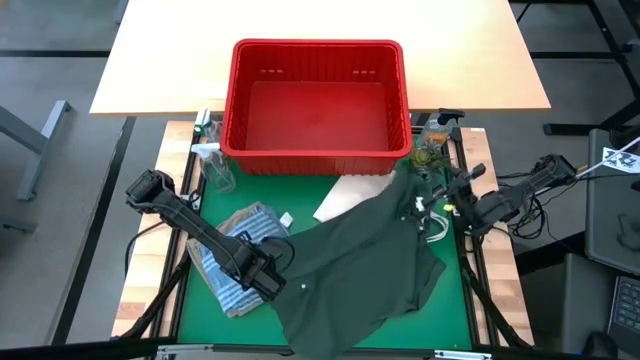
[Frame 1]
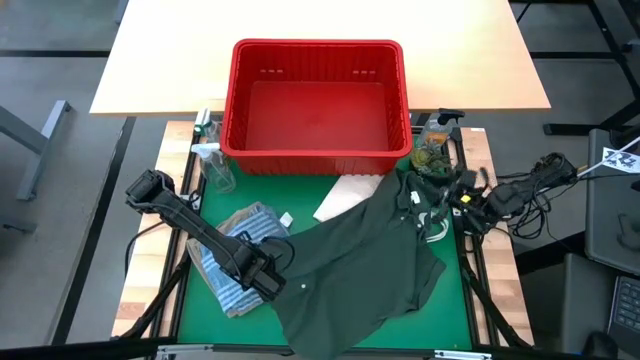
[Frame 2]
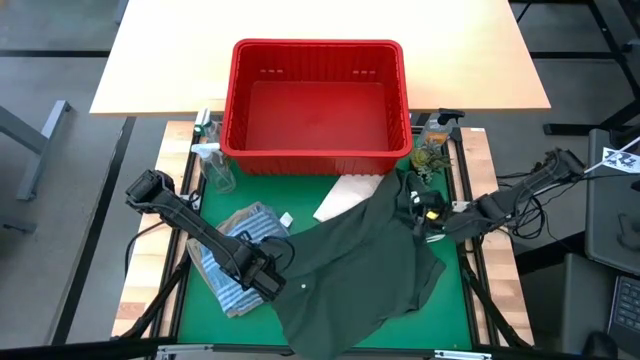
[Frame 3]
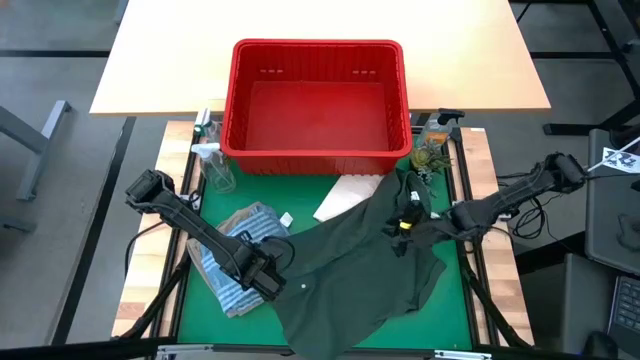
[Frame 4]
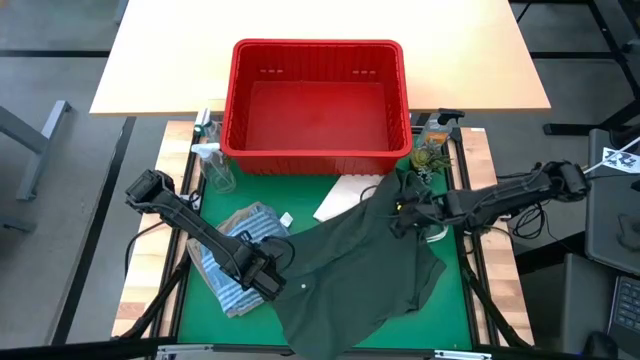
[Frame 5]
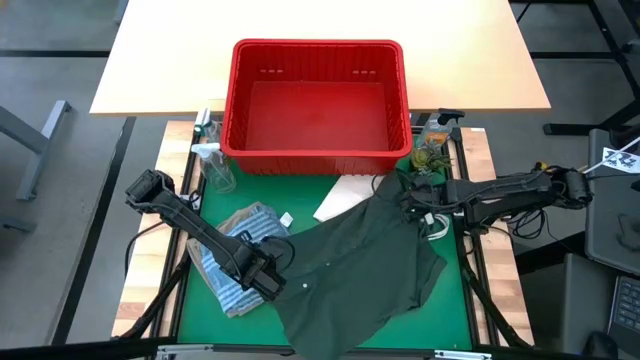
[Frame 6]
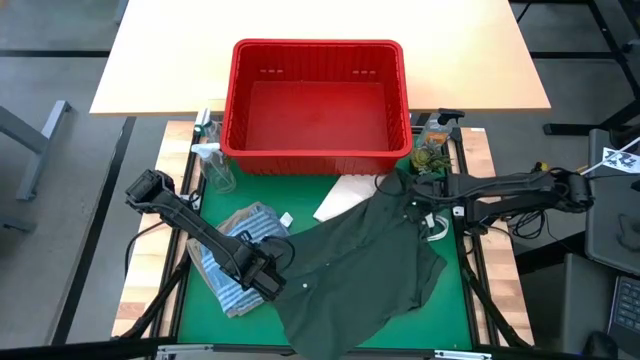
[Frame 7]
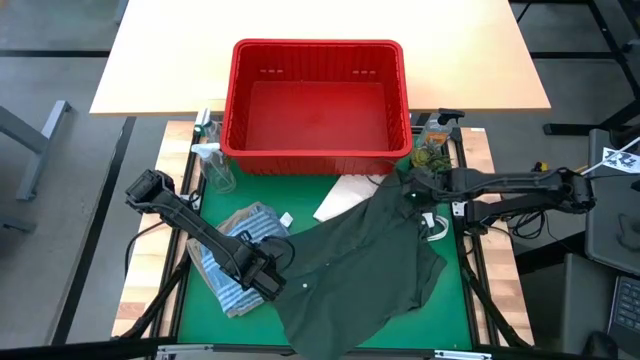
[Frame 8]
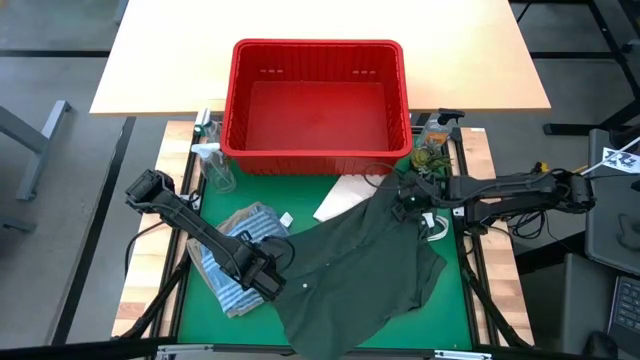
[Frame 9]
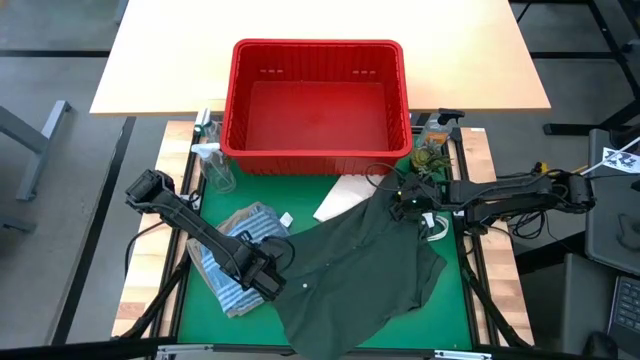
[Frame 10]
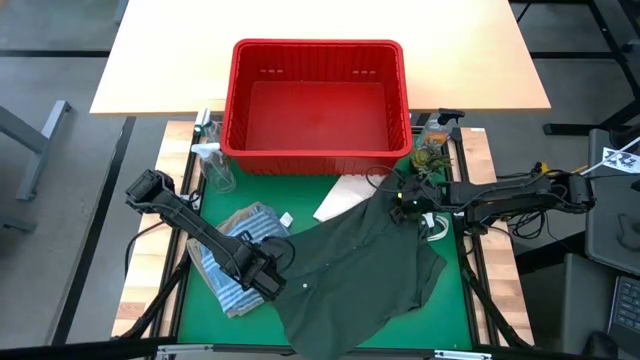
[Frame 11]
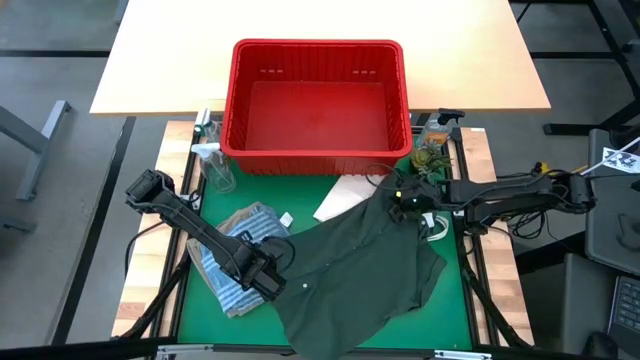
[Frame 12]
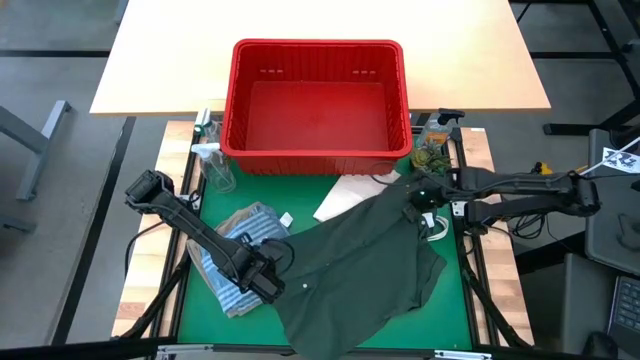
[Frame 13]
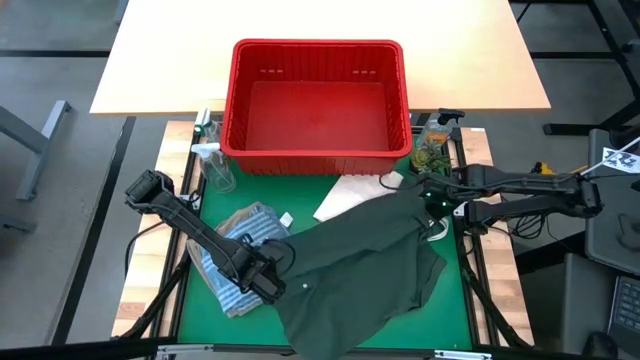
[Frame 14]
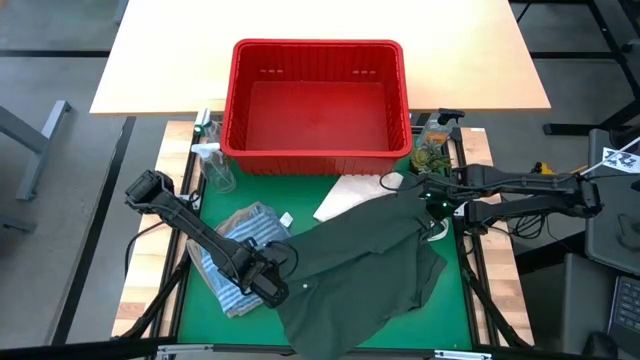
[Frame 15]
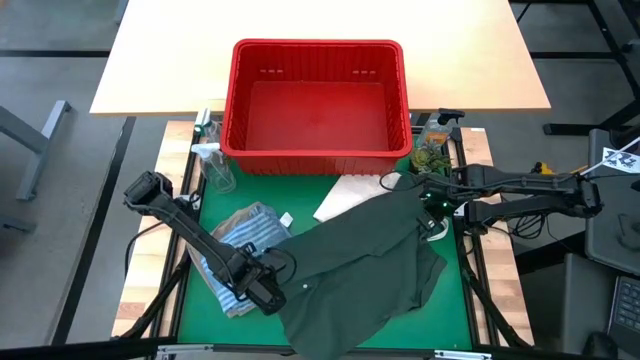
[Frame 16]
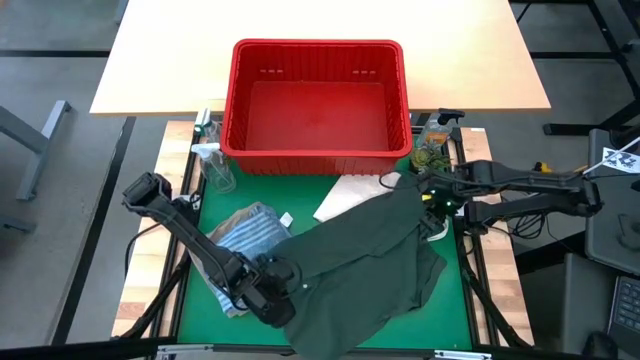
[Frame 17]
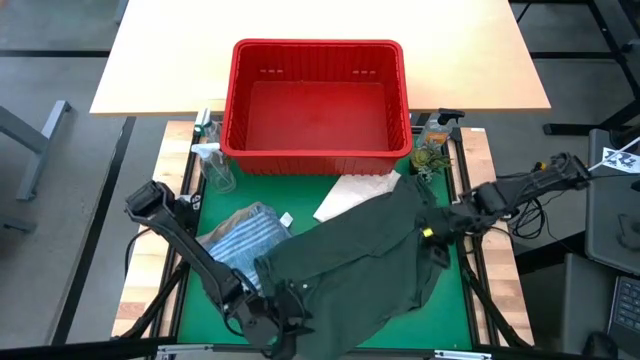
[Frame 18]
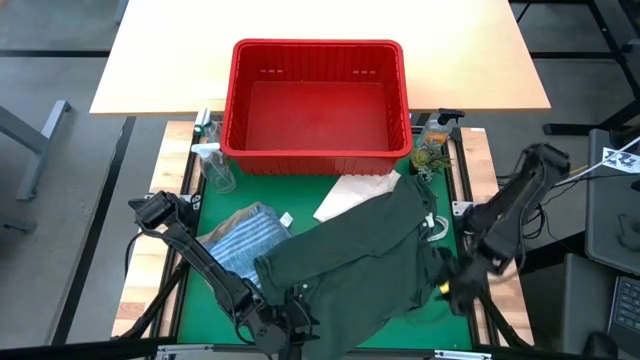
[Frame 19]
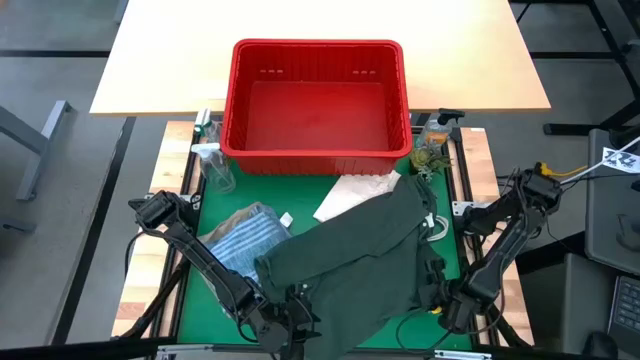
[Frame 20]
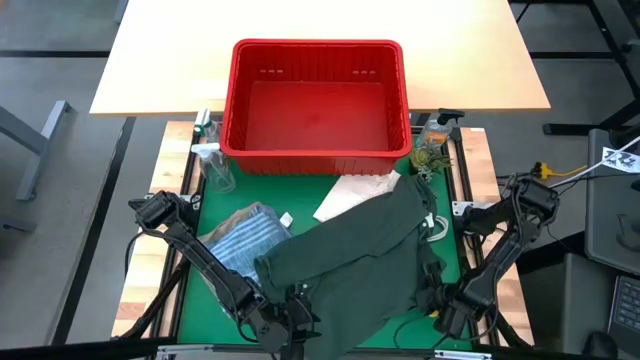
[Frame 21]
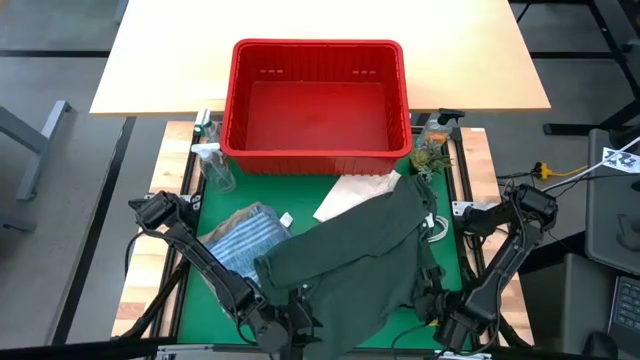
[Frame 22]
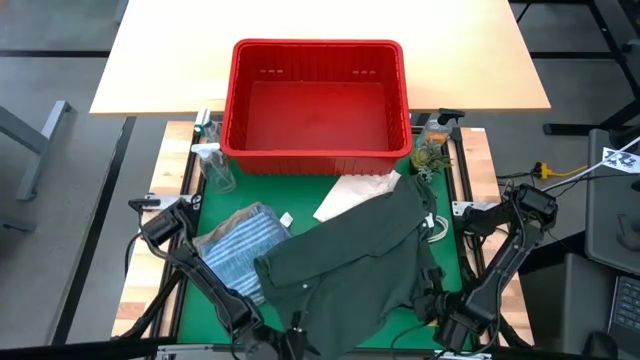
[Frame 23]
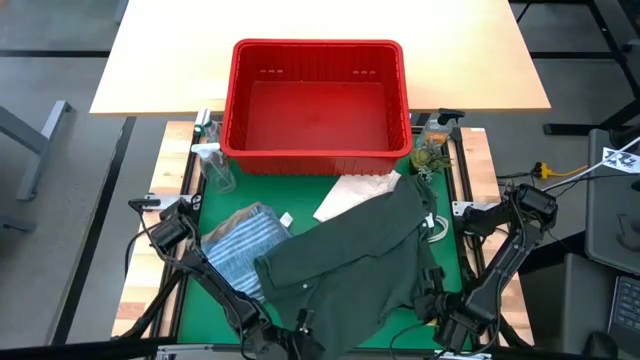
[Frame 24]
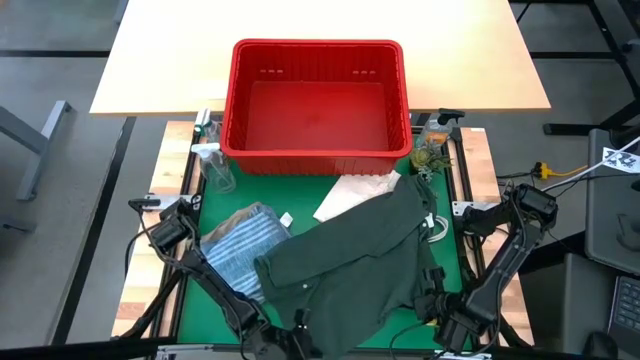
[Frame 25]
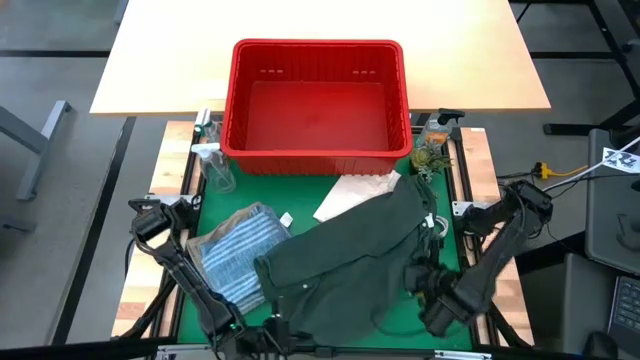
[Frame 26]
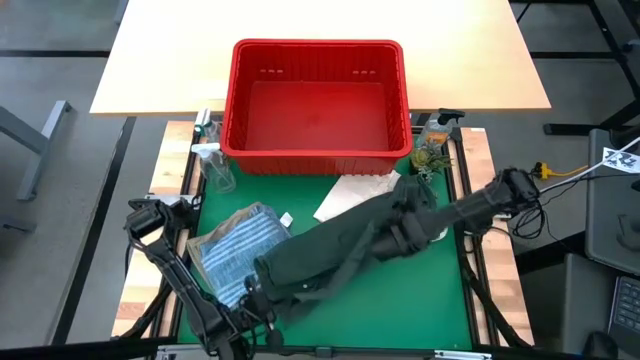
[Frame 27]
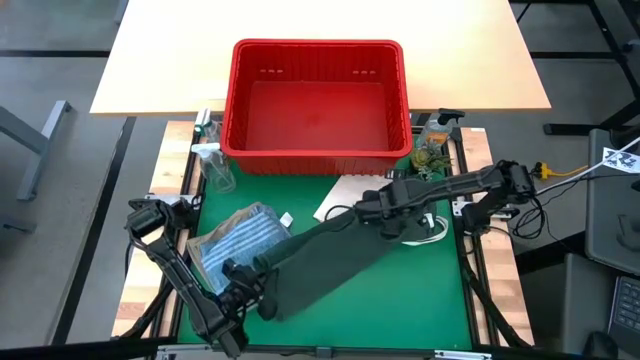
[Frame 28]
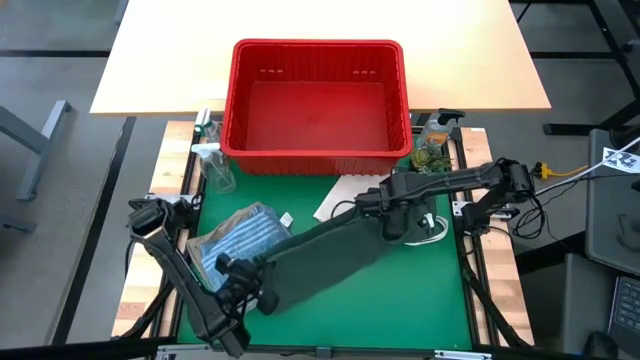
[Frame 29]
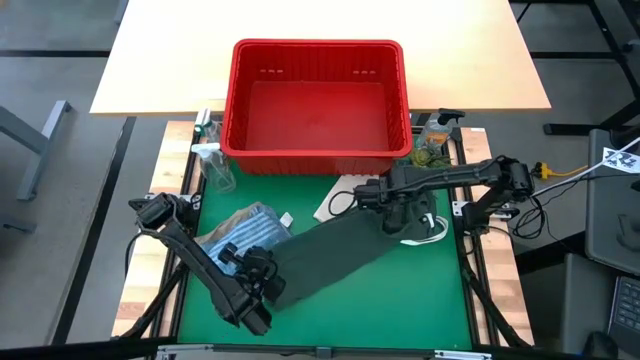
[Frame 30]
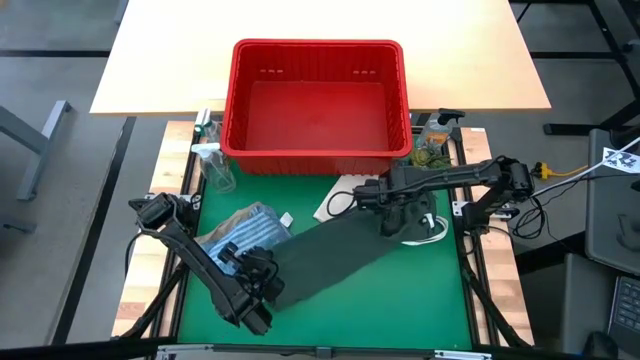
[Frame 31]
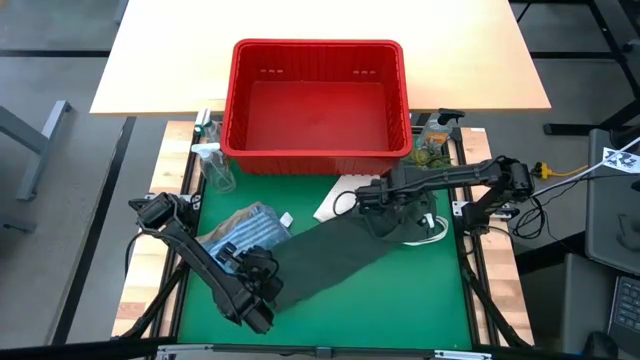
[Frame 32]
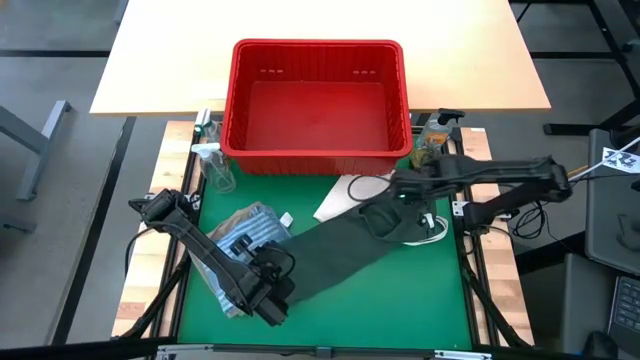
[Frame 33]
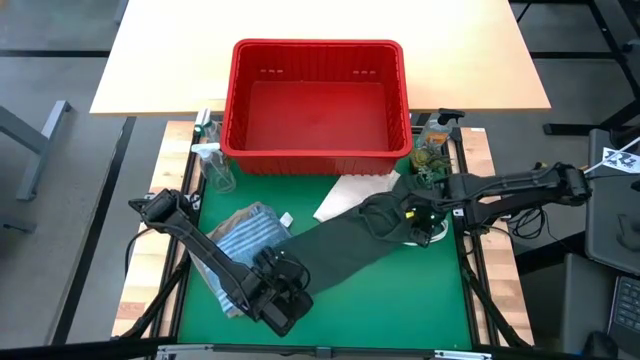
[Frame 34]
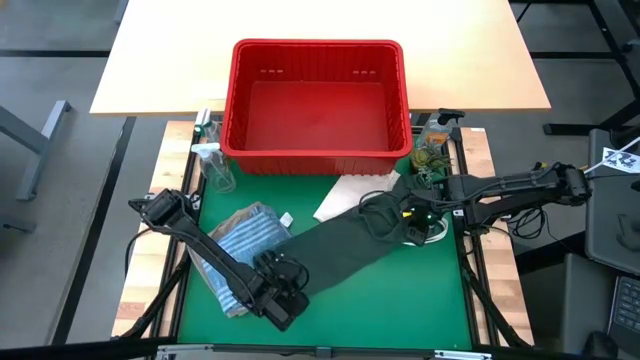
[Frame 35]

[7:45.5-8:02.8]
Task: Fold Laundry from Bin
Fold the green polo shirt
